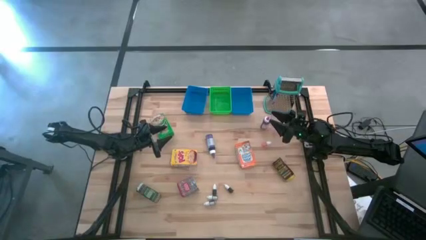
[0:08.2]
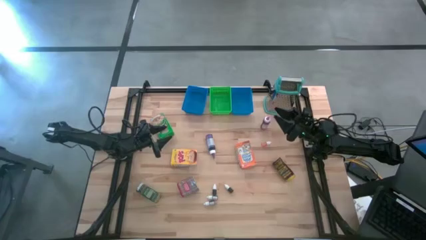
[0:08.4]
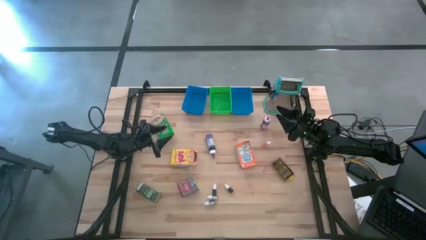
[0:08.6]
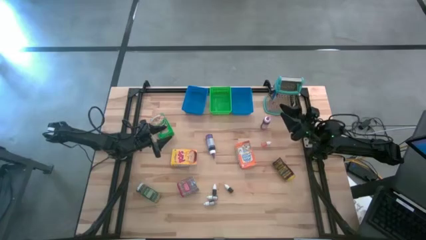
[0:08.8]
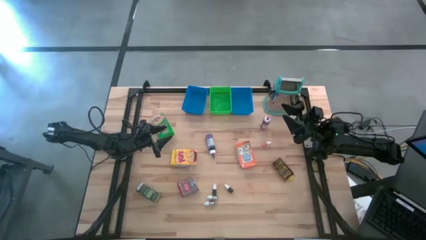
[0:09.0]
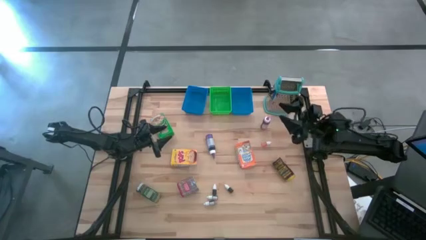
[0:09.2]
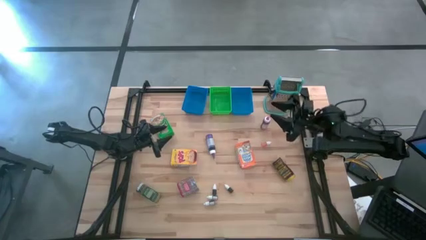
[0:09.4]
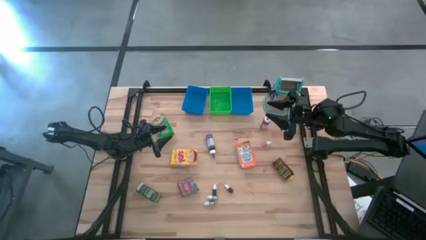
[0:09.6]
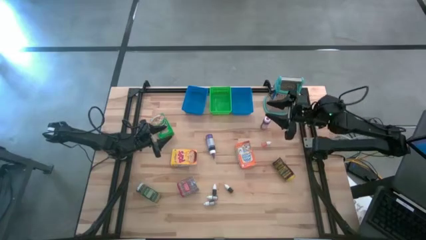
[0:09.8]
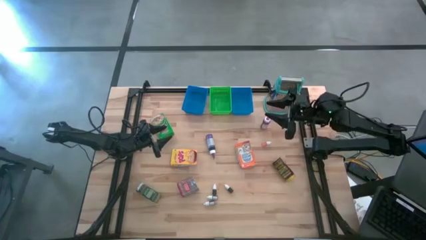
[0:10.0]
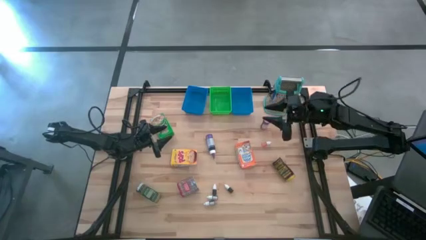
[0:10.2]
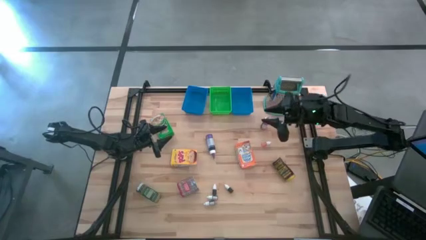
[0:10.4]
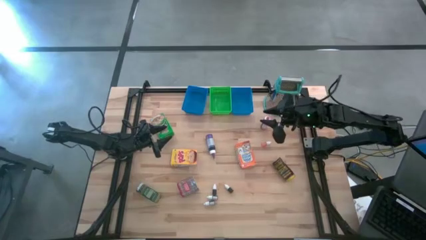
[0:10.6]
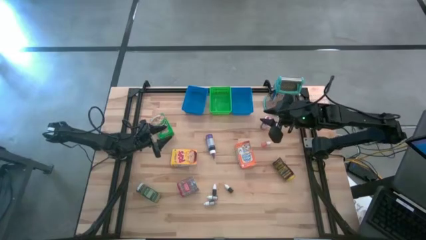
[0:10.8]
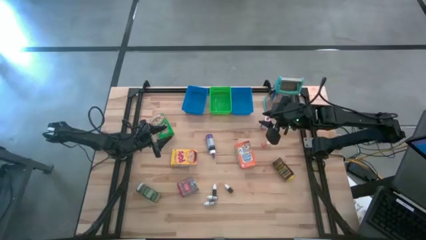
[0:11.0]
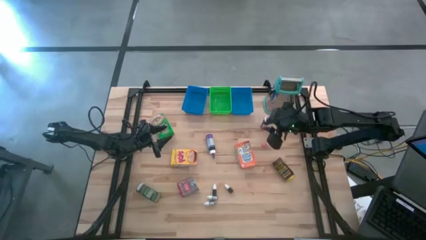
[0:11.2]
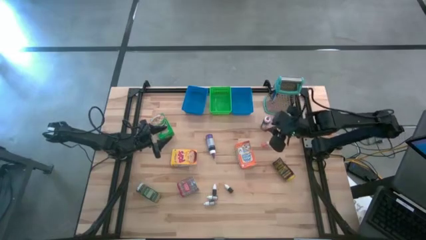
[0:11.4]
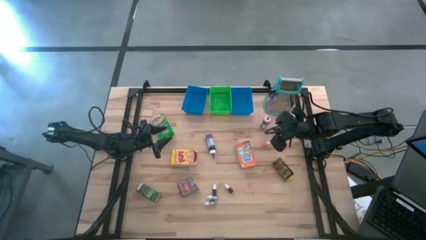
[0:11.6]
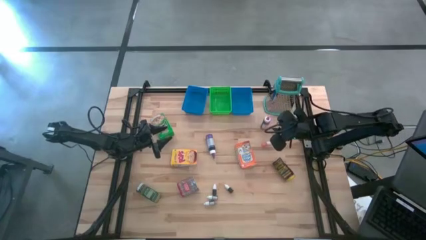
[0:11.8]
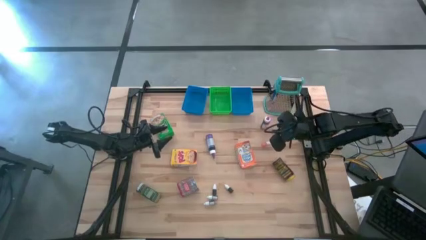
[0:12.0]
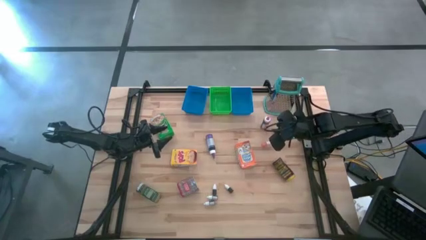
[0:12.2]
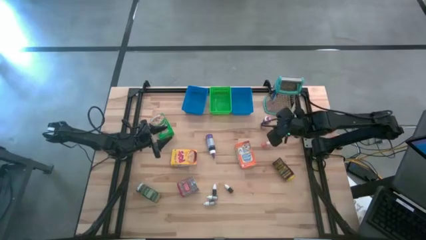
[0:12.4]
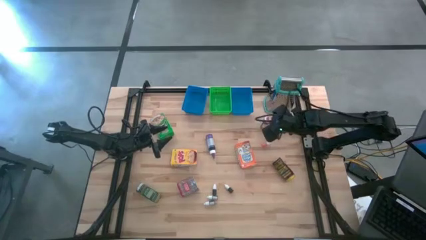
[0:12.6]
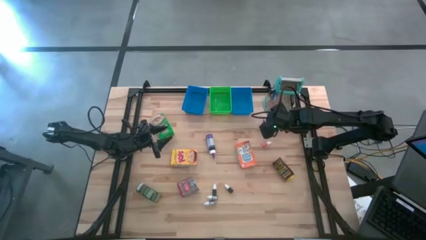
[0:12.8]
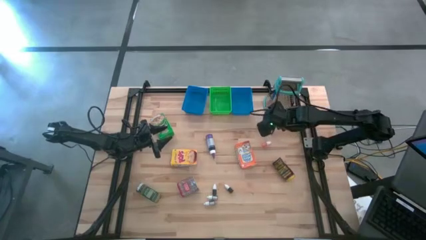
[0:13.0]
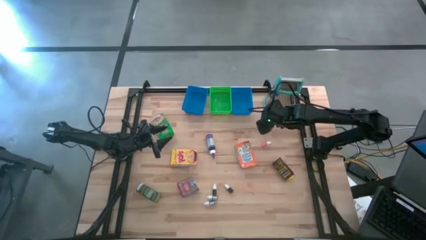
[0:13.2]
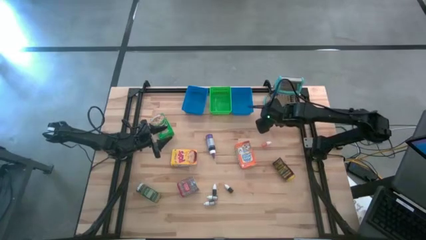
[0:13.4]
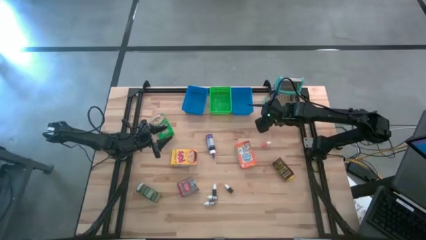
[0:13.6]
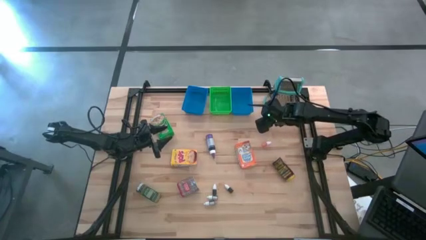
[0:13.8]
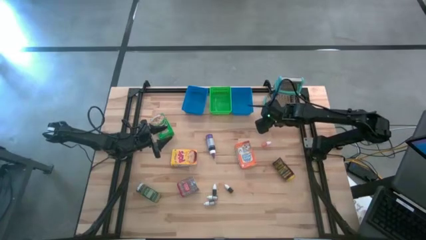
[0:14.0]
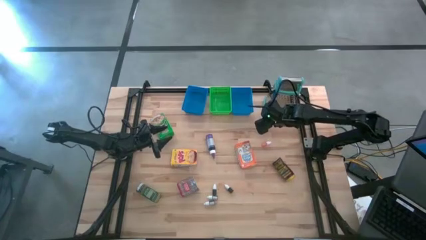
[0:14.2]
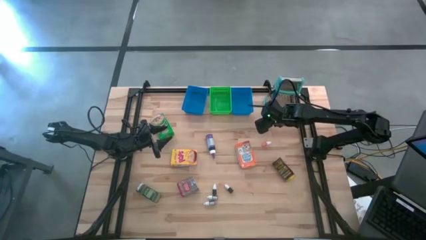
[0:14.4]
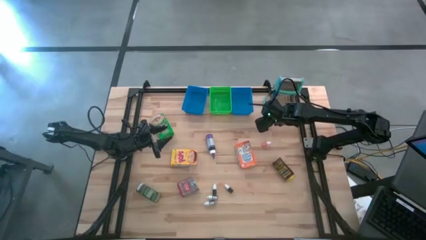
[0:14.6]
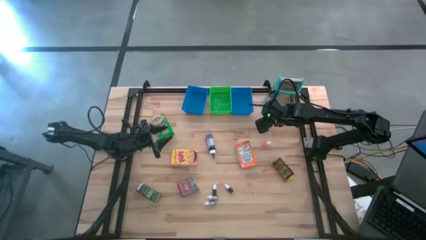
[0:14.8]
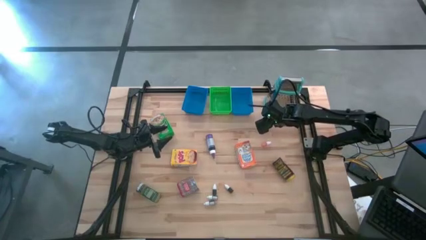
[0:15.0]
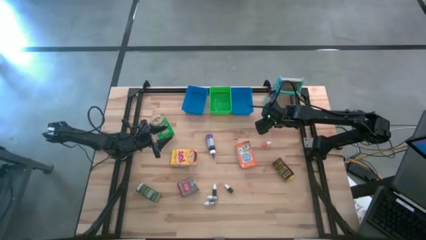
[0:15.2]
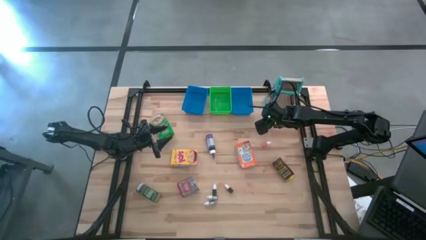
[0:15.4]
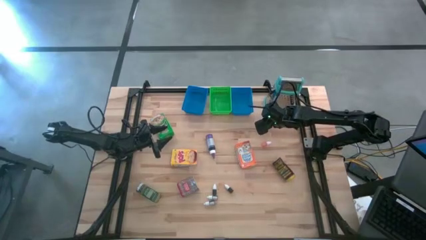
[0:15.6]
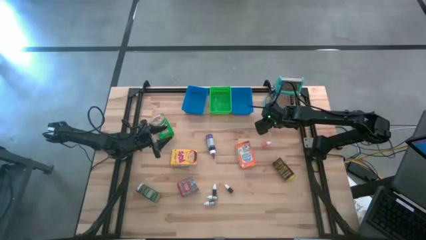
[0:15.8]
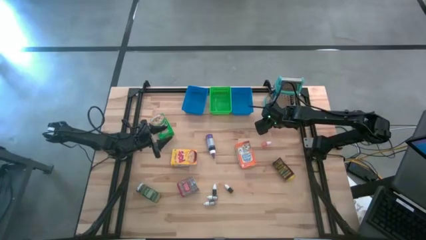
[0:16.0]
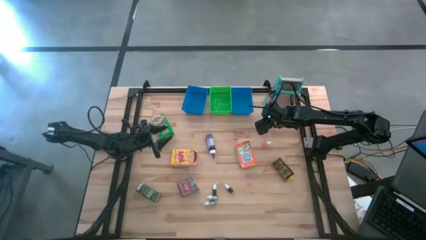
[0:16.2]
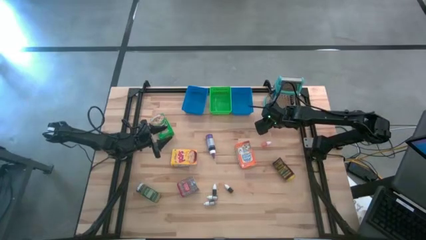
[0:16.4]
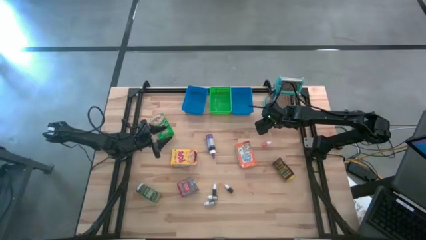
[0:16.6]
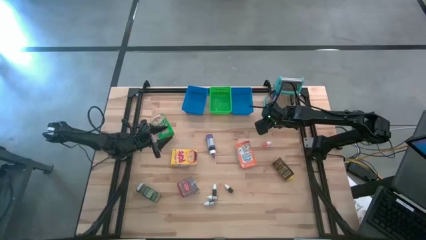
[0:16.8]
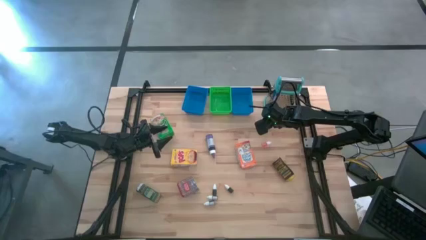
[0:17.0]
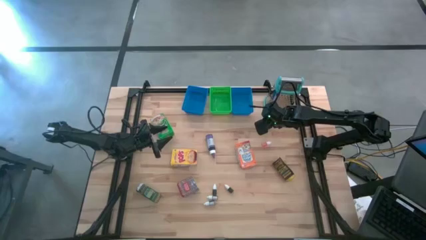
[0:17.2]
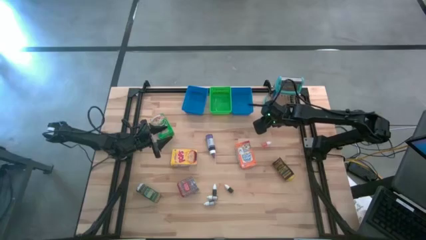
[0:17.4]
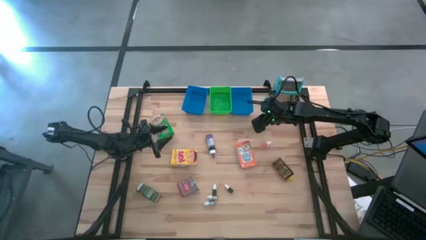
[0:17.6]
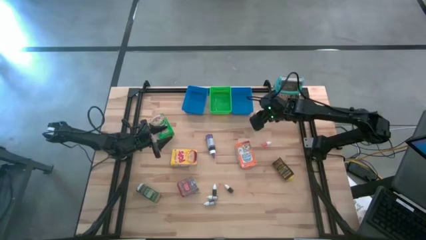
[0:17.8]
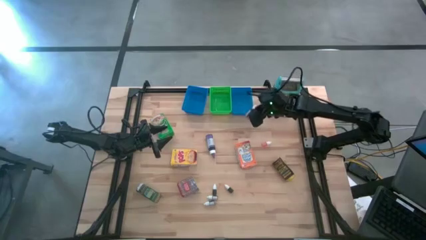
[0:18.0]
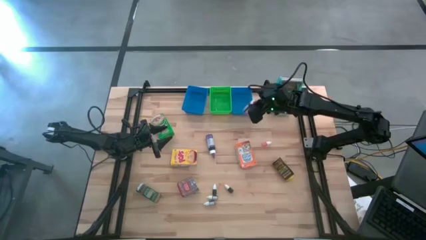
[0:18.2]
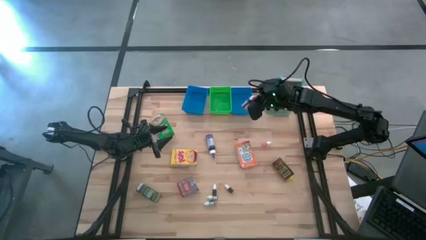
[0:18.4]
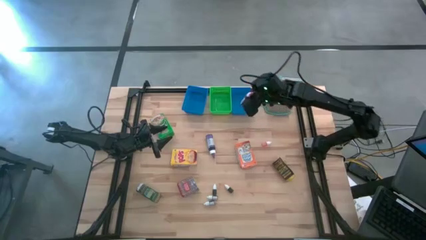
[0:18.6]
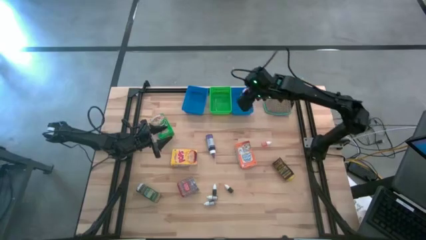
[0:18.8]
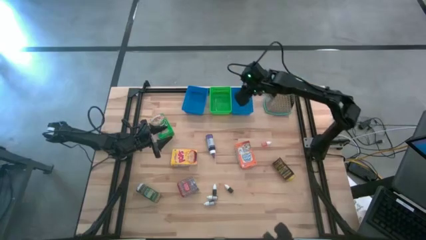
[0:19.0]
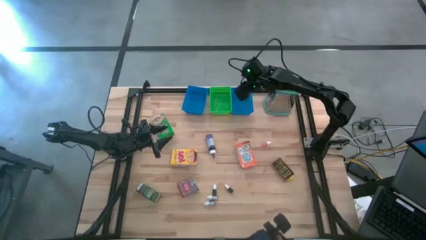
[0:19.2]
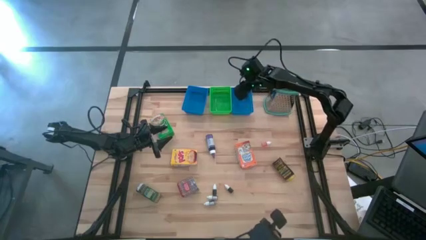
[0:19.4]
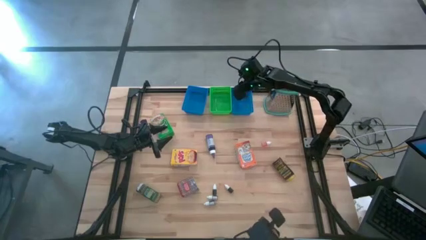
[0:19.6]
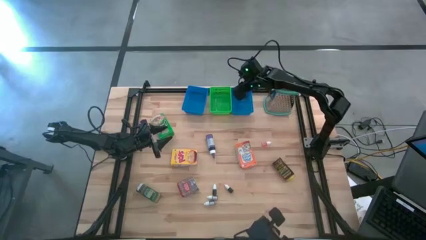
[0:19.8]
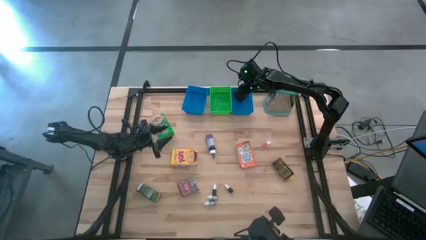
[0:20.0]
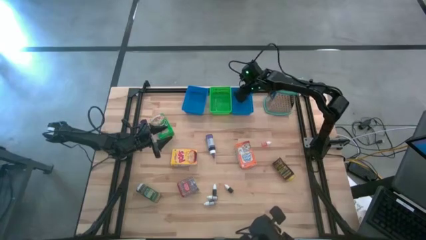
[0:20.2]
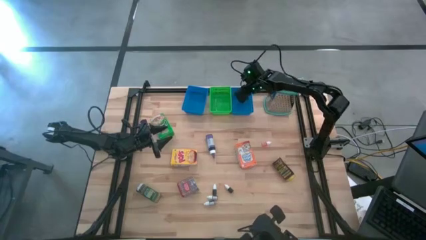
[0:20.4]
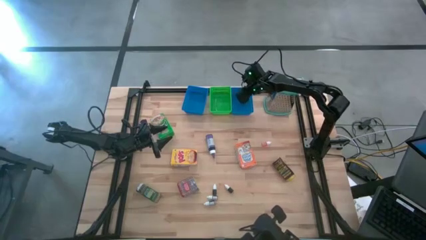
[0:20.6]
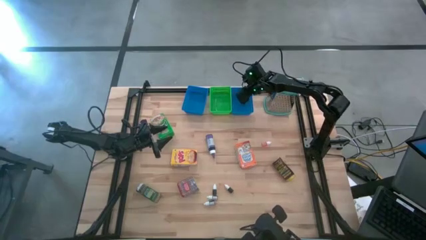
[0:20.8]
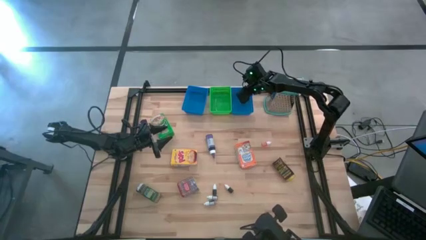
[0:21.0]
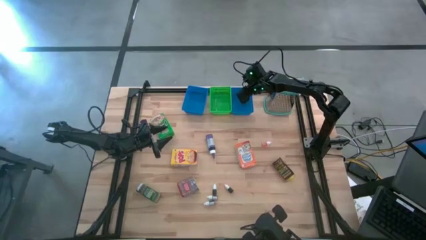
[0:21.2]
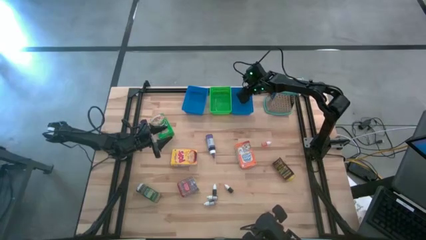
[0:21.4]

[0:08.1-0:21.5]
Task: Pick & Place Kitchen Items
Put the large pink food coloring bottle into the right blue bin

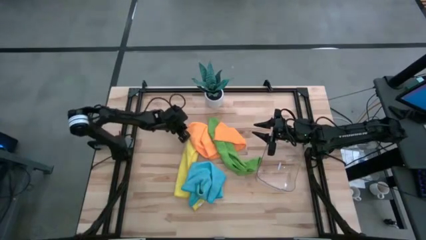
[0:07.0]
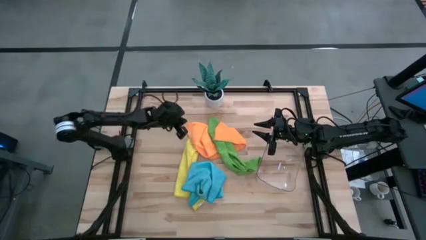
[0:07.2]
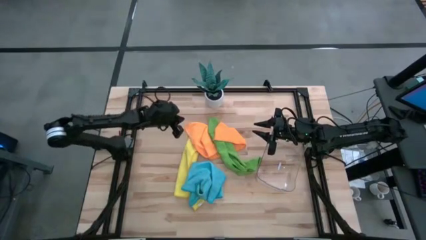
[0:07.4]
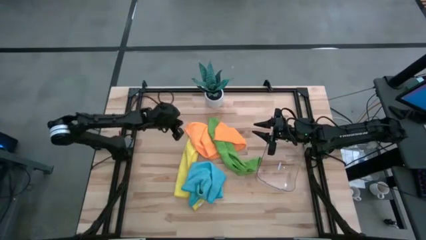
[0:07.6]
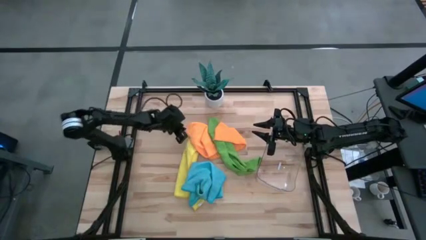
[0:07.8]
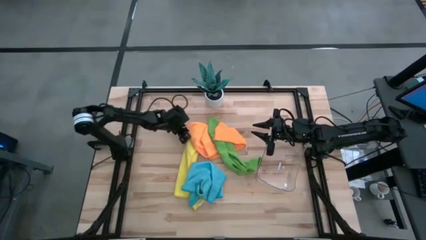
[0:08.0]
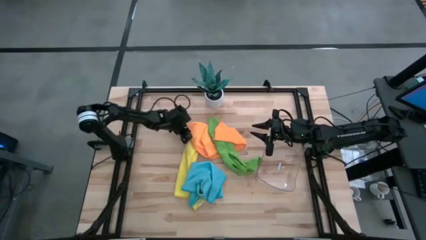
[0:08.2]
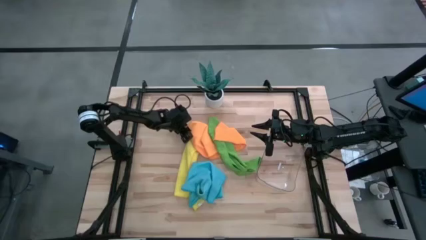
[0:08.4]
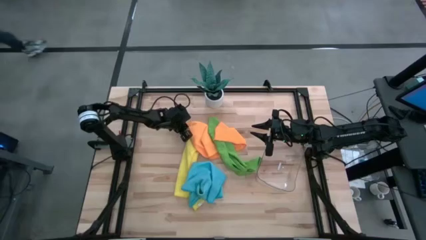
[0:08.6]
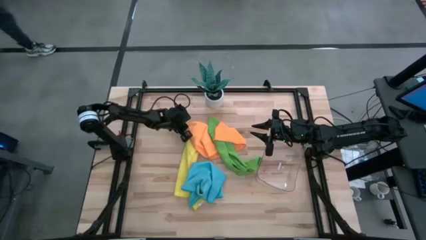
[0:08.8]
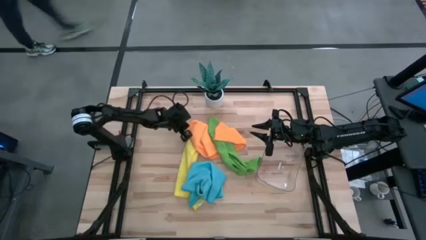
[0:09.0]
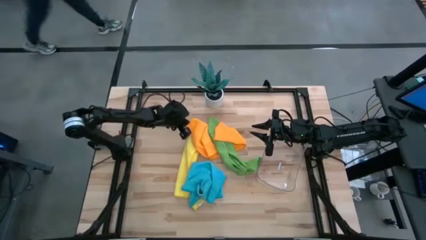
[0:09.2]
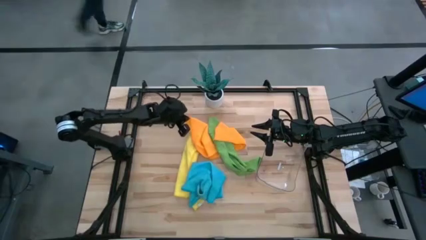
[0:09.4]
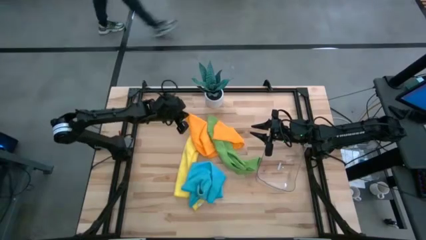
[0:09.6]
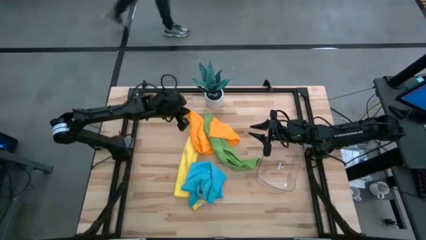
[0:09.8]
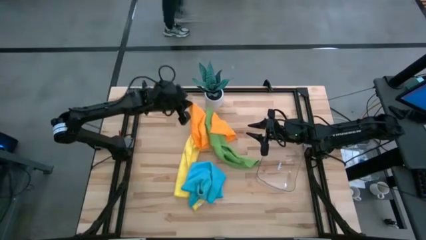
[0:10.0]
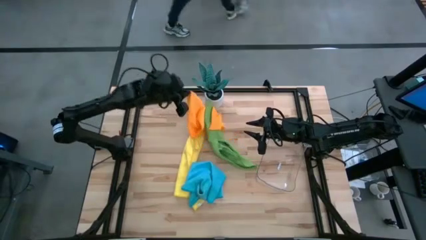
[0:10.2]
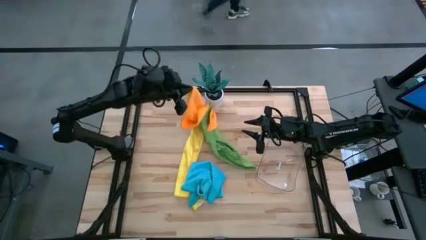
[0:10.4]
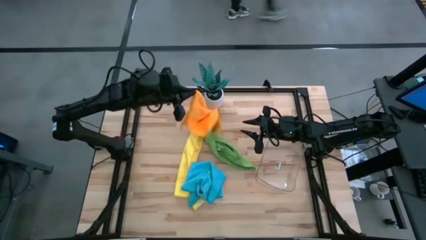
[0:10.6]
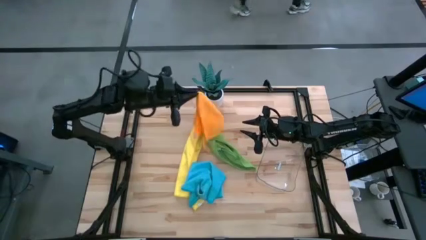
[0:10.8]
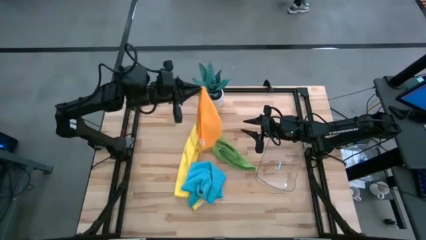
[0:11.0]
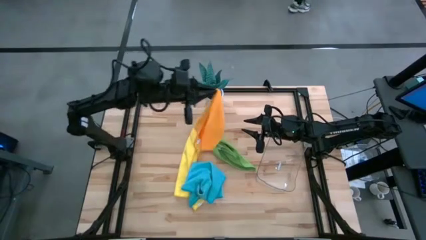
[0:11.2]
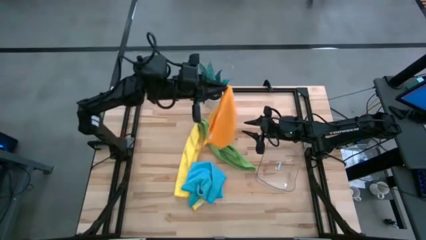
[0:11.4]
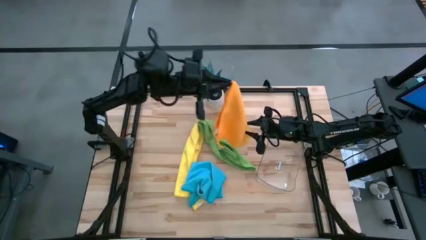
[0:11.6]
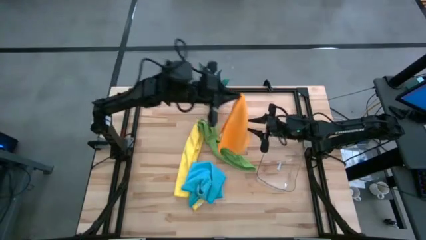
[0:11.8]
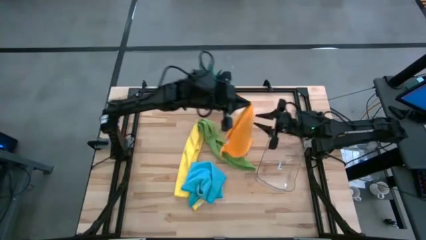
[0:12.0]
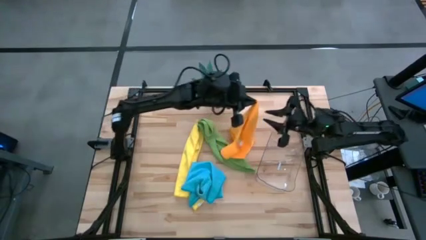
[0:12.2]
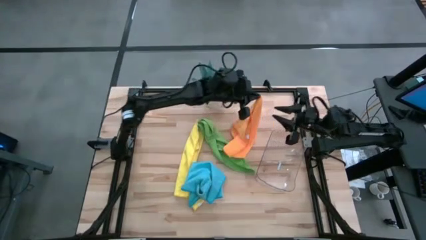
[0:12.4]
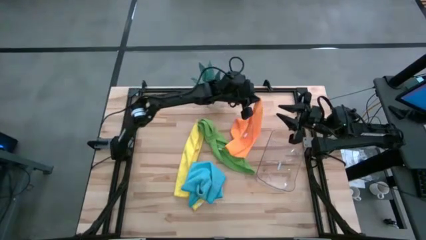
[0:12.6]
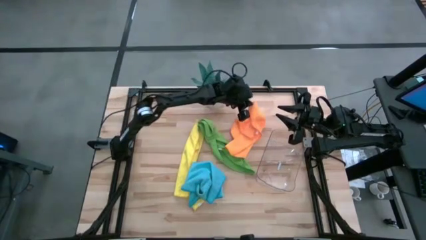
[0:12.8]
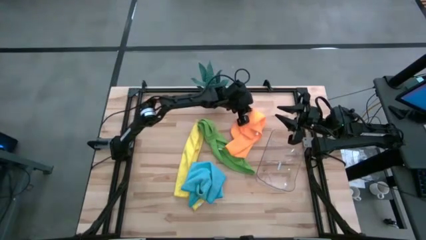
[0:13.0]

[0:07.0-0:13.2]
Task: Roll microfiber towels into tight, uniform cylinder then place into a basket
Move the orange microfiber cloth from center to top right
